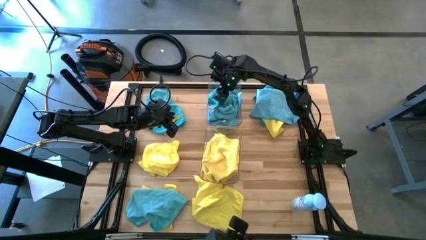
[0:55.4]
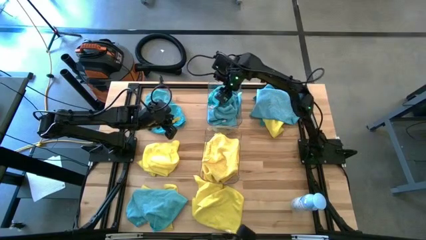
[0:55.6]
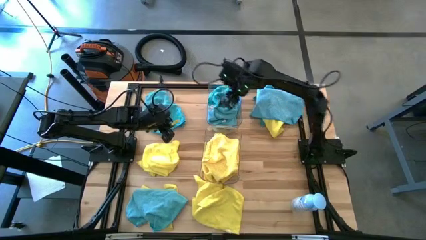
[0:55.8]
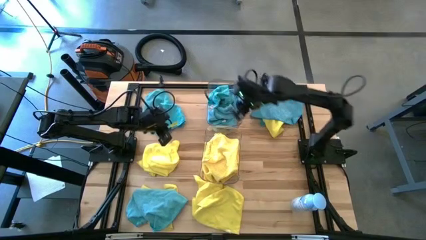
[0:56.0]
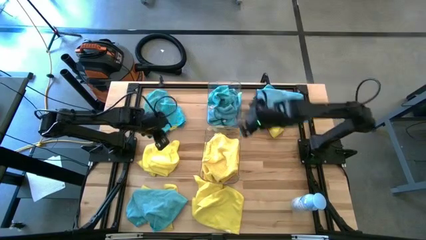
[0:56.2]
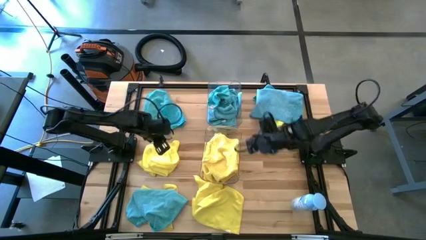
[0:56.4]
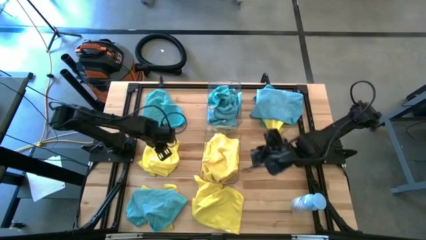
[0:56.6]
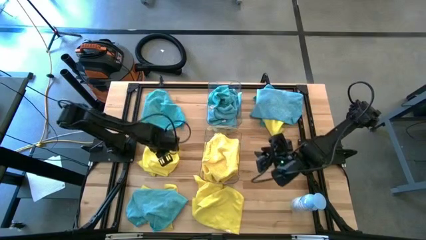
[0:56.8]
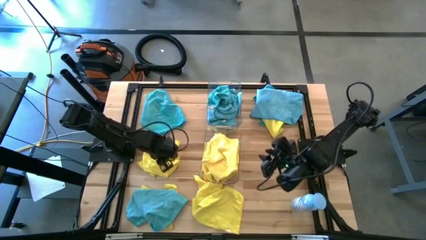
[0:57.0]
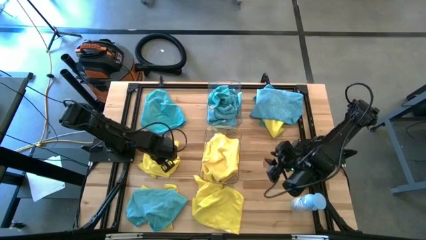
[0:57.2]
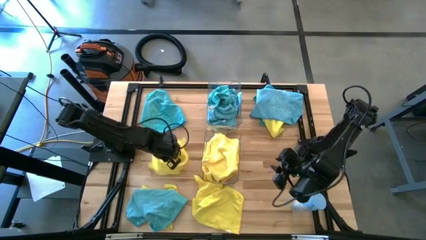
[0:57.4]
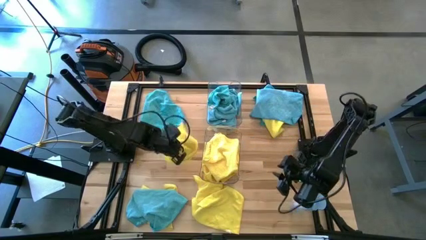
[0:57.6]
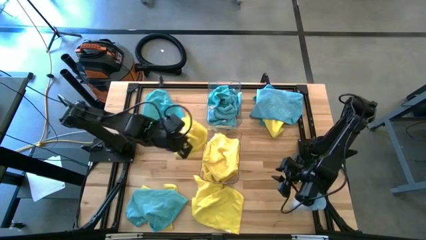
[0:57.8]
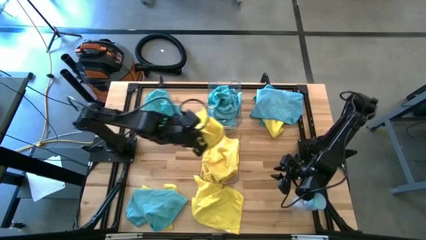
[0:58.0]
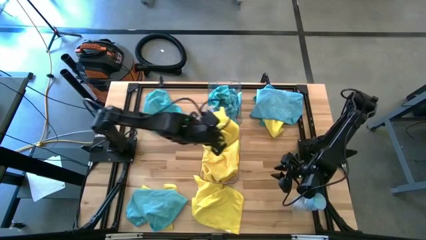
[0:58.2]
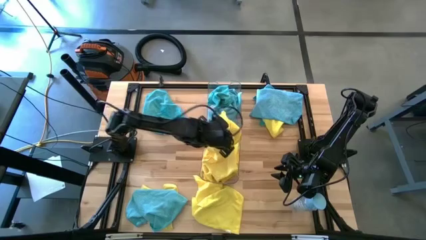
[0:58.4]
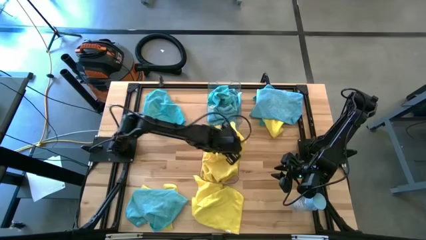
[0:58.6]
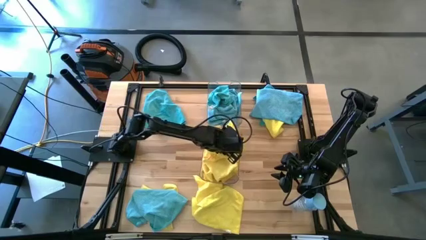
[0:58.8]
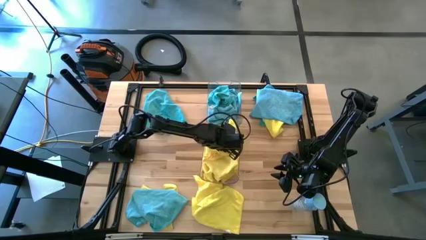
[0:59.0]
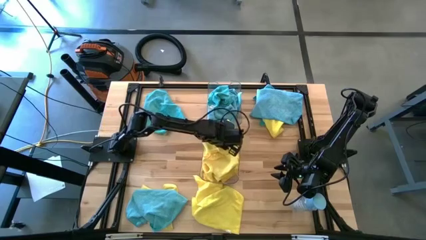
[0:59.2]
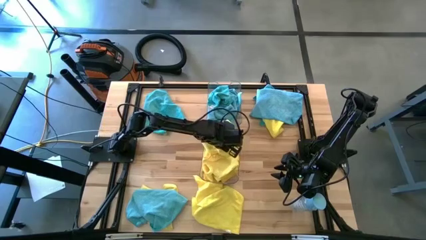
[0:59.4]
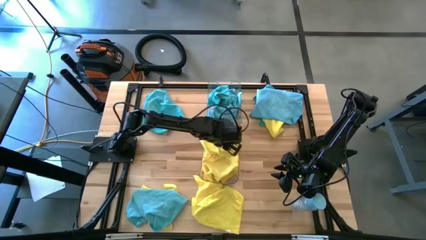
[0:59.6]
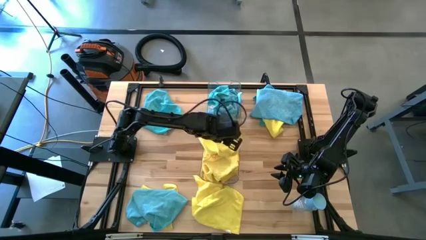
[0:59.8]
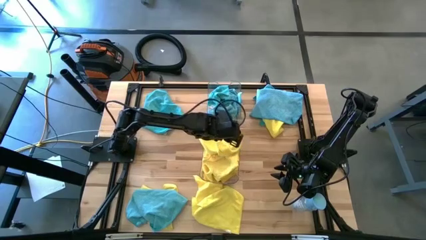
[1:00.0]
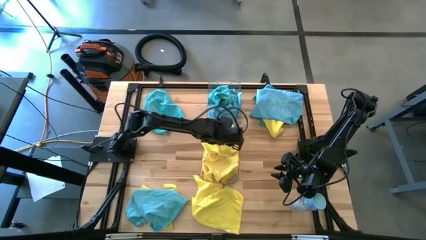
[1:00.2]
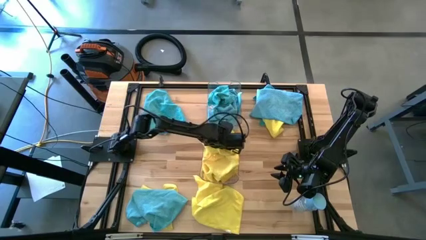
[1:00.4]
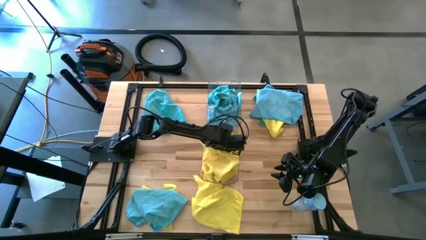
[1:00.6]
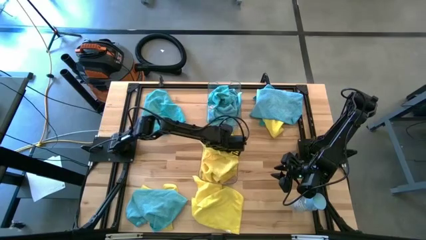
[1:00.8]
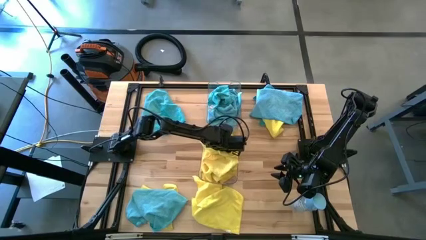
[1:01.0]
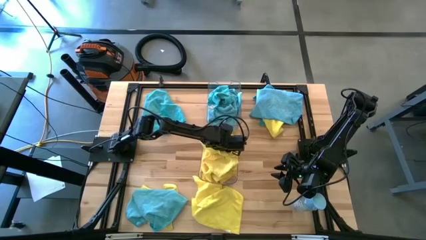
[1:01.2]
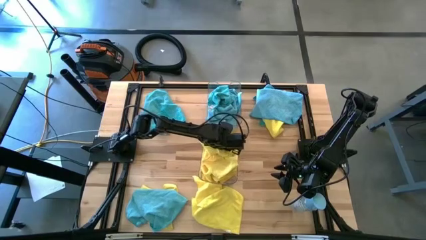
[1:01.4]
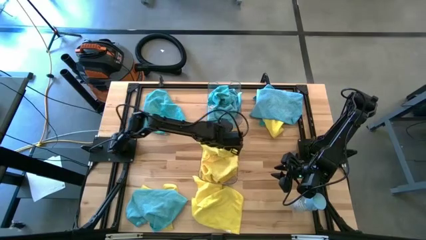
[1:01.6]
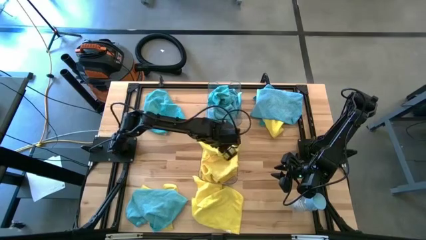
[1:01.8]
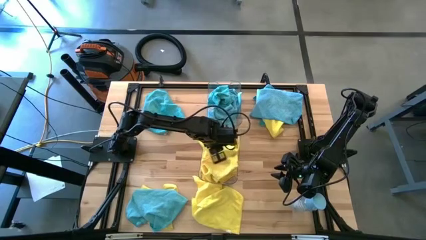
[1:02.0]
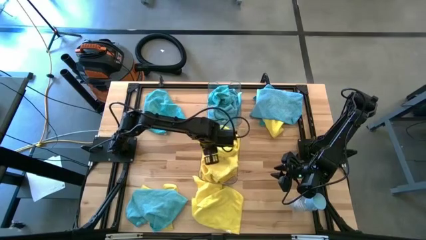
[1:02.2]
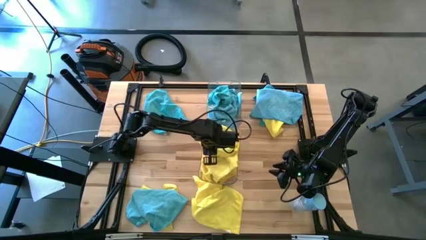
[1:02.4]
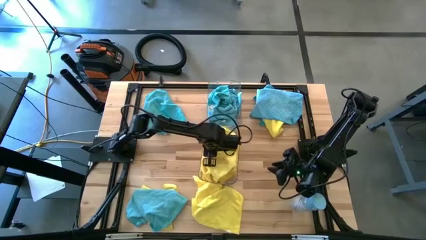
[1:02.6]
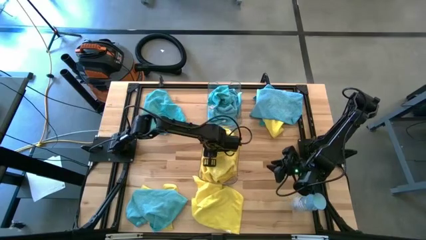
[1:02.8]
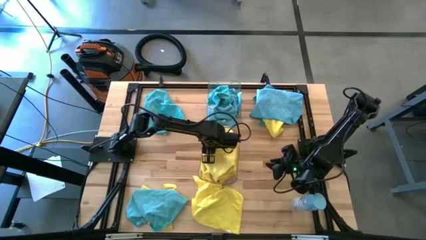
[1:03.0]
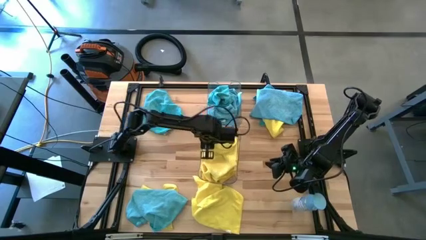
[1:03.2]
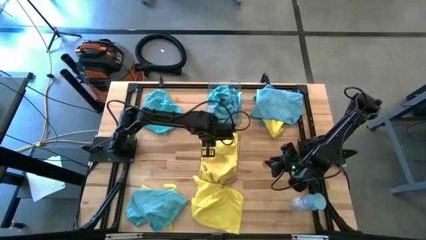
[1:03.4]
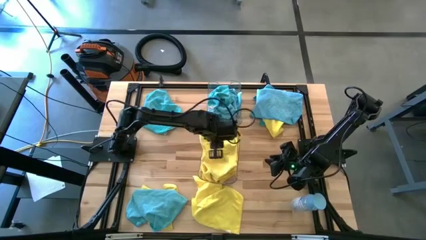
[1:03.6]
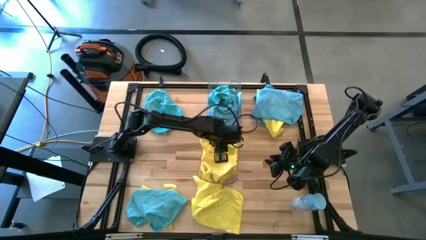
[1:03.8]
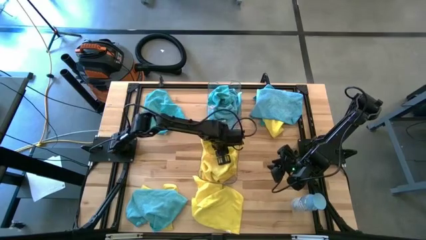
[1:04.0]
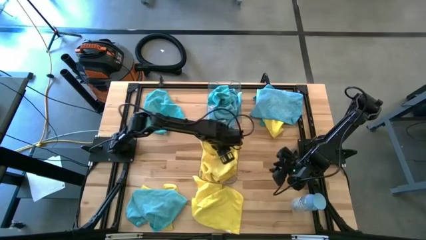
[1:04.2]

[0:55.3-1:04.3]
Task: Sort microfiber towel by color & place in baskets
Put the yellow towel into the bottom transparent bin

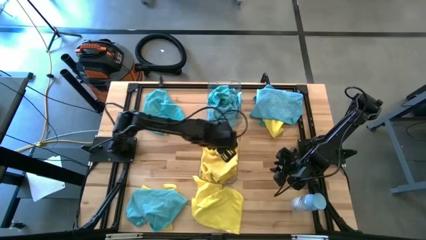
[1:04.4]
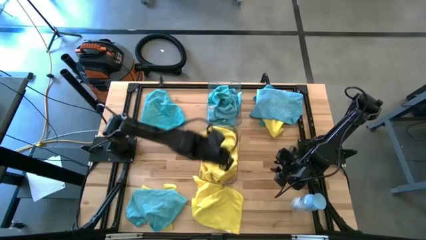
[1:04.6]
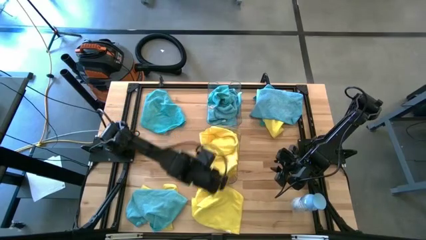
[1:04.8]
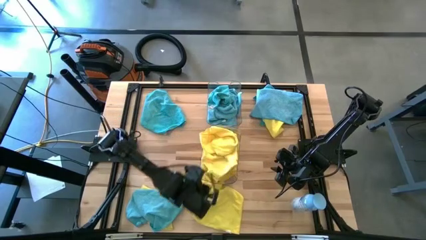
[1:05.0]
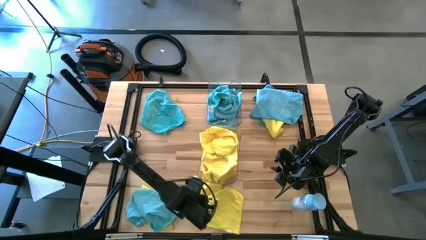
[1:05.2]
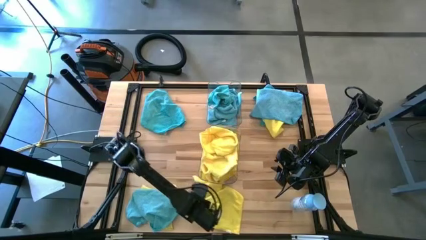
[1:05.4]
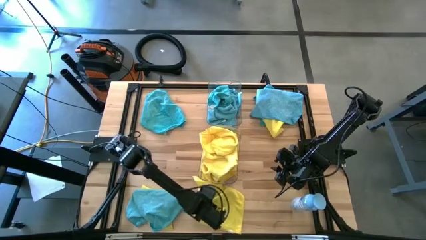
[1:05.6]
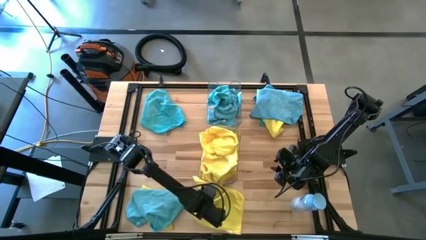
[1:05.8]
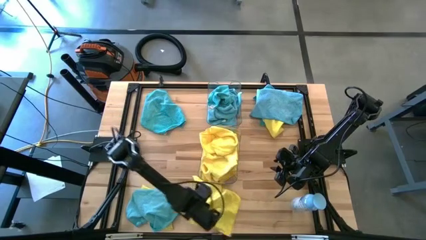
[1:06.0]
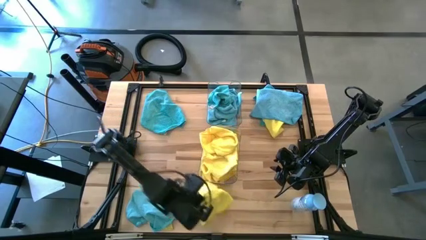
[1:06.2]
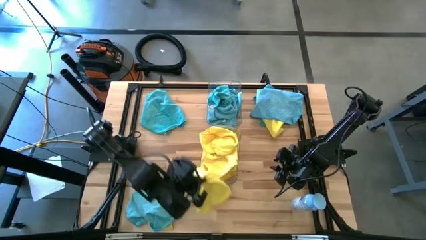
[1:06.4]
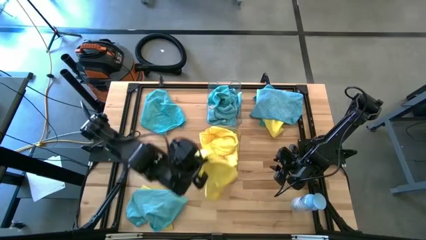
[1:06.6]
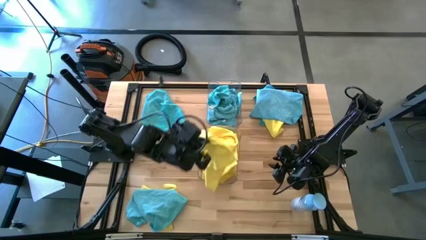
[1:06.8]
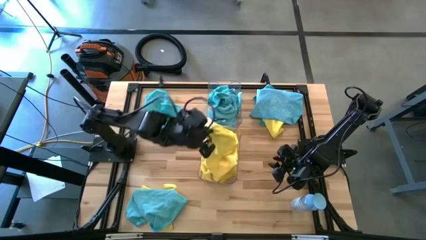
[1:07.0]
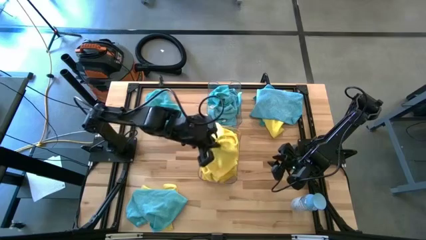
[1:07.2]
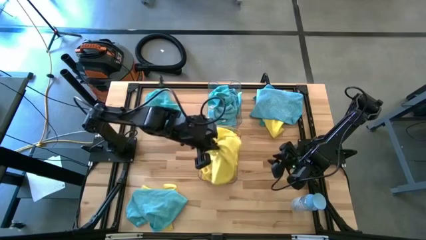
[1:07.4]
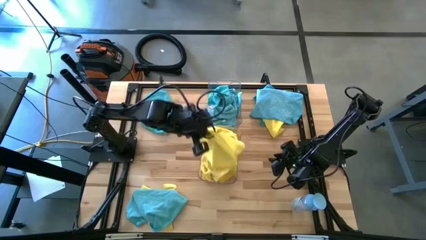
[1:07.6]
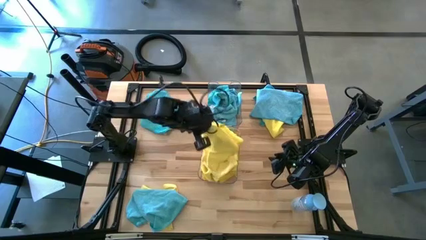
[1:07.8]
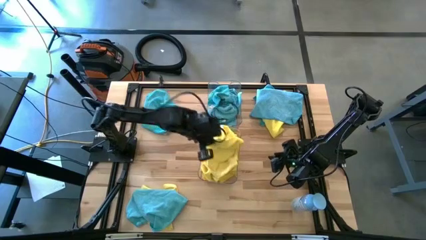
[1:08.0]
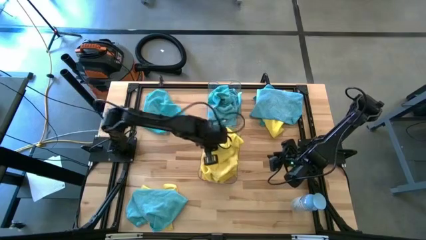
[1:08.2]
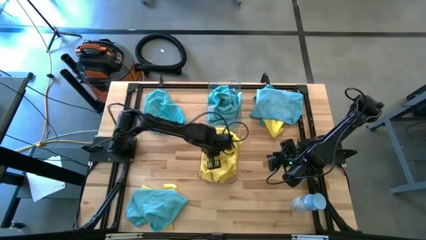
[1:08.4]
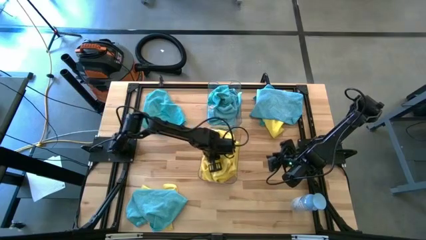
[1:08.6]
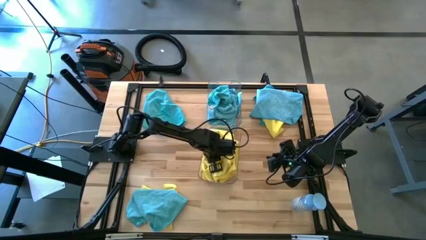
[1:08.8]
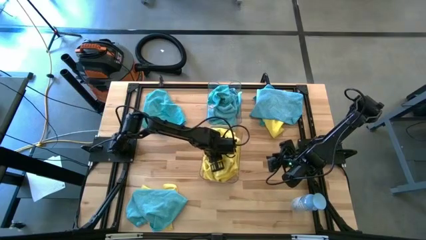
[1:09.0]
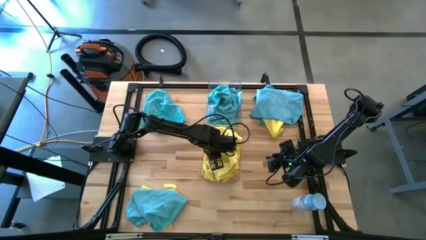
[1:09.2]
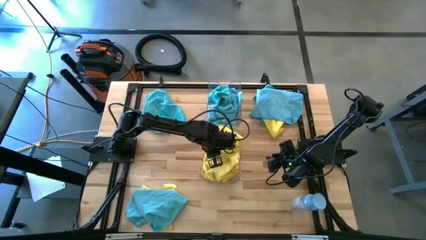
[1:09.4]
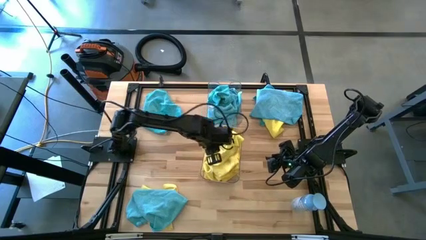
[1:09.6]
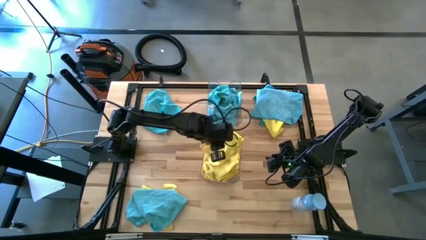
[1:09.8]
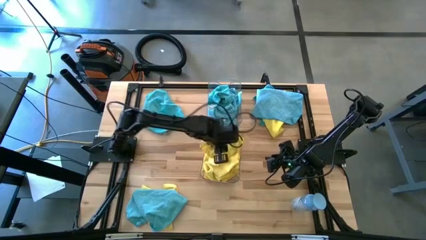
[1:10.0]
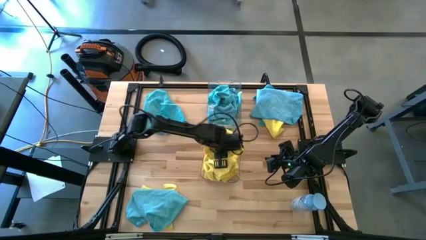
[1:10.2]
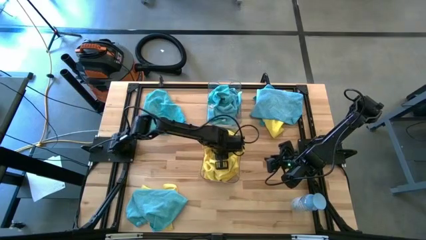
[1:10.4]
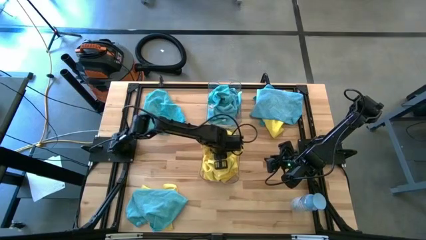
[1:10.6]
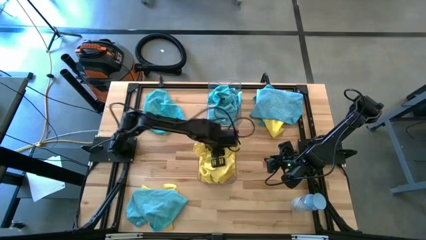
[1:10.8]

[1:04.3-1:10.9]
Put the yellow towel into the bottom transparent bin

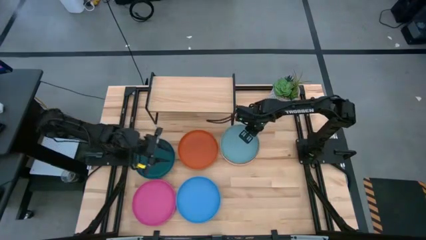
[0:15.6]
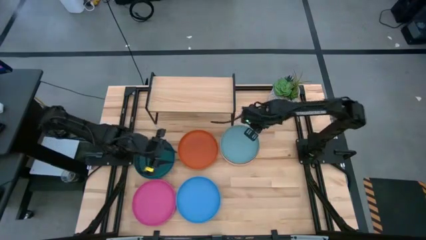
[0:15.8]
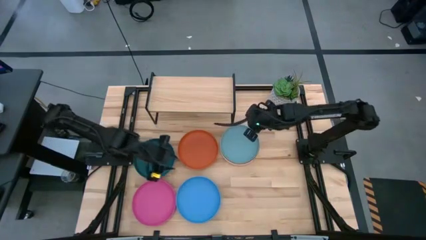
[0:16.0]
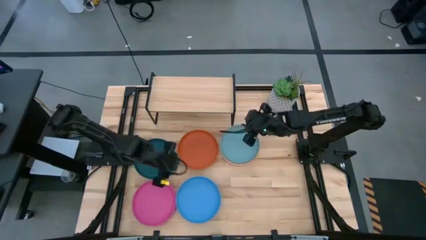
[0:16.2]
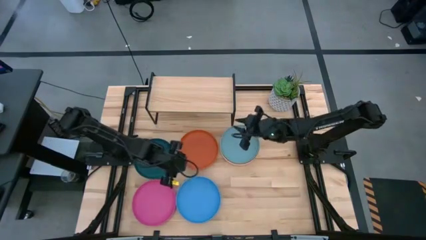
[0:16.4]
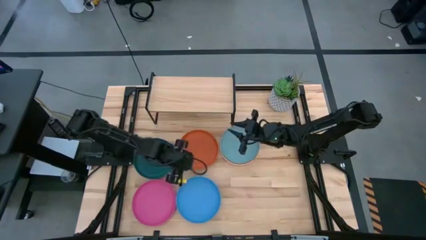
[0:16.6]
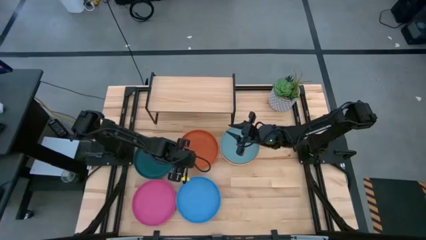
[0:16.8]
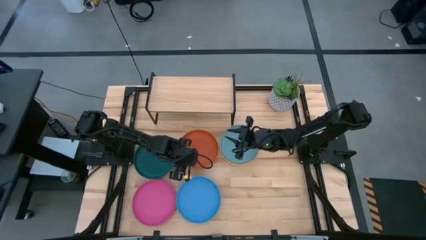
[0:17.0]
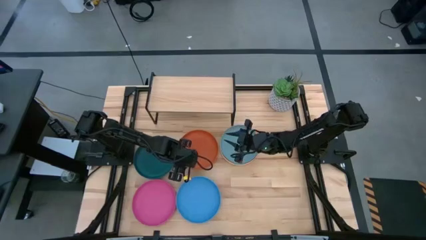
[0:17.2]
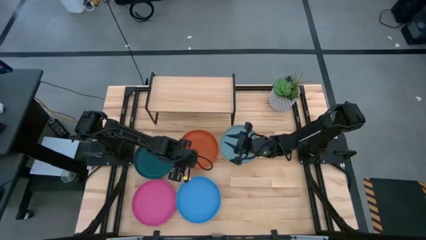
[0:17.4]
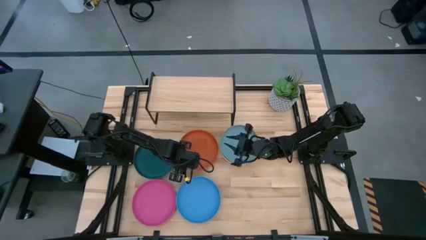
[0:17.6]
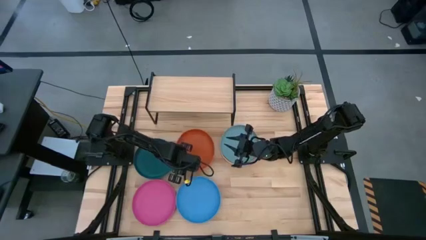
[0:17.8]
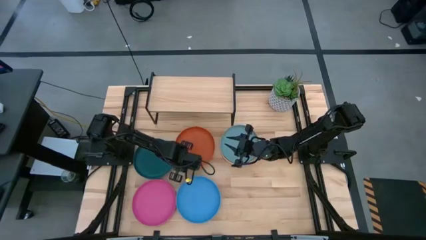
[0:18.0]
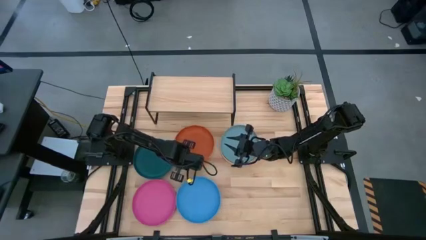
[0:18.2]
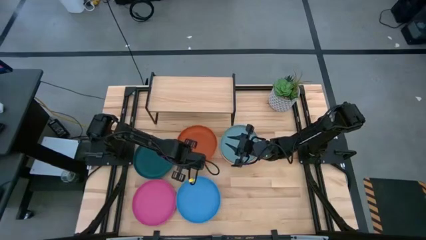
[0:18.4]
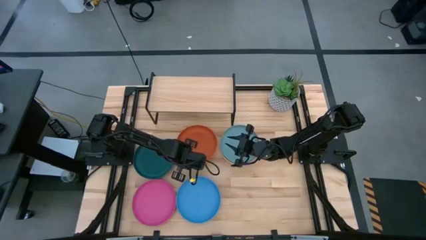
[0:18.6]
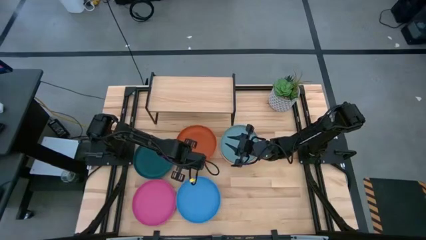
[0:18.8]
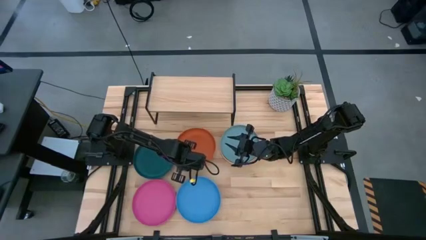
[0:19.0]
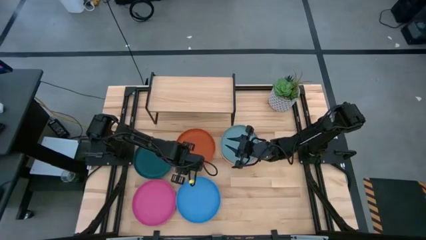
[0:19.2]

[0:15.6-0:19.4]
Task: Place and stack plates onto a shelf
Adjust the orange plate
